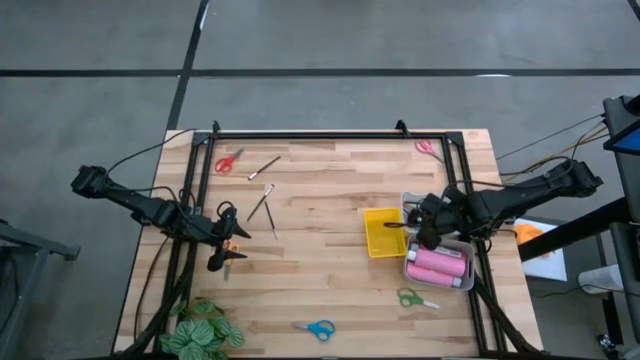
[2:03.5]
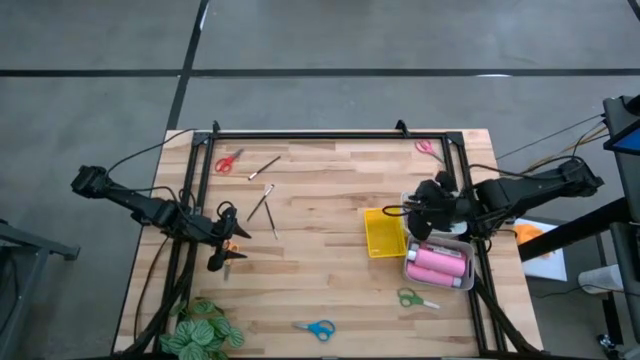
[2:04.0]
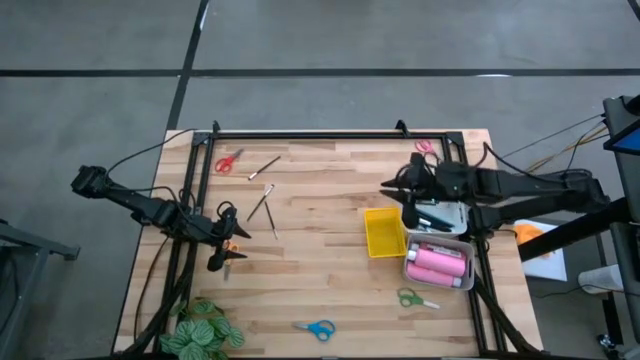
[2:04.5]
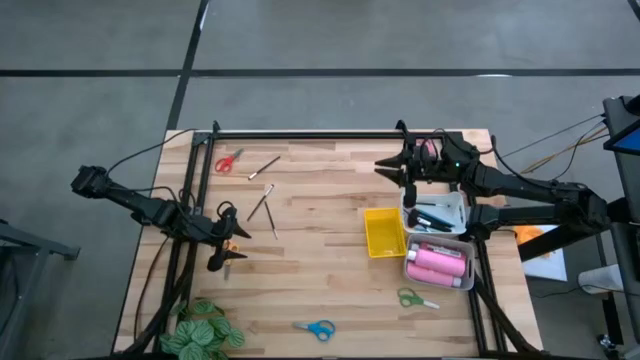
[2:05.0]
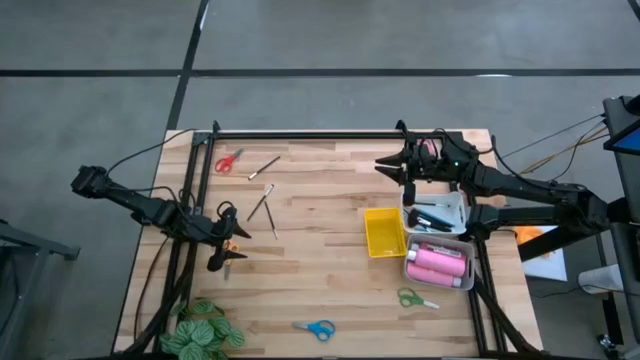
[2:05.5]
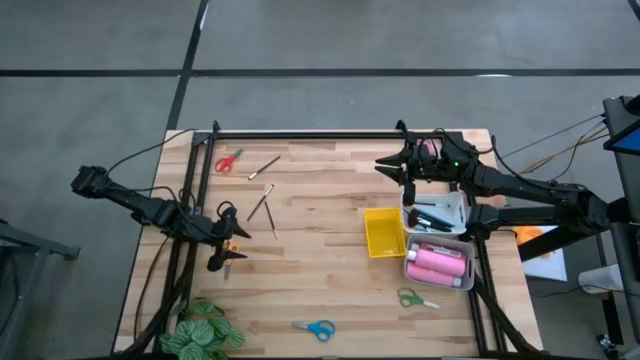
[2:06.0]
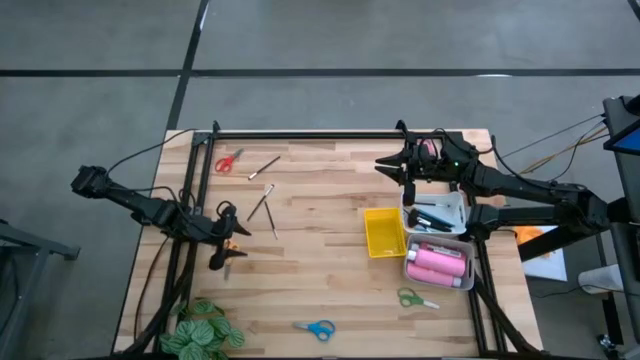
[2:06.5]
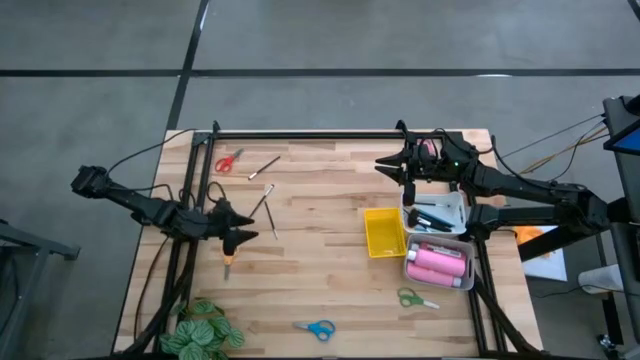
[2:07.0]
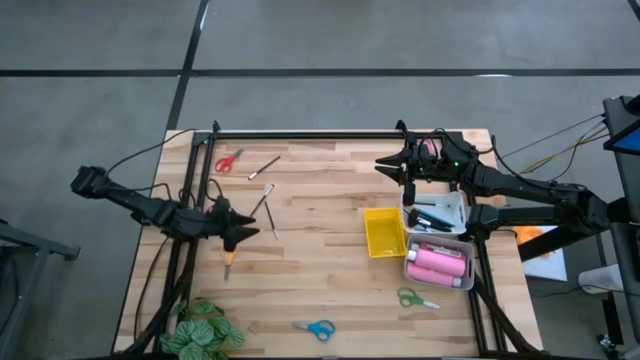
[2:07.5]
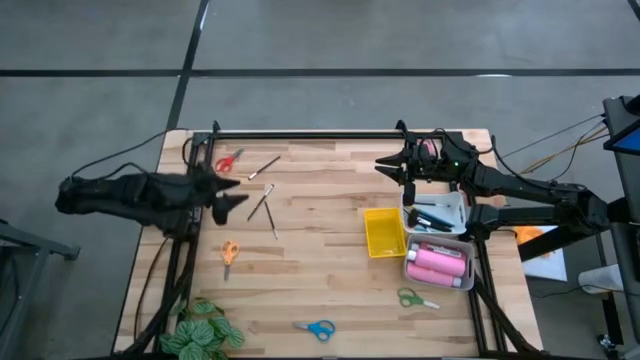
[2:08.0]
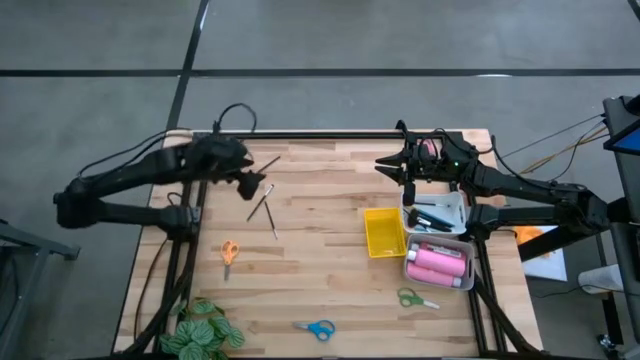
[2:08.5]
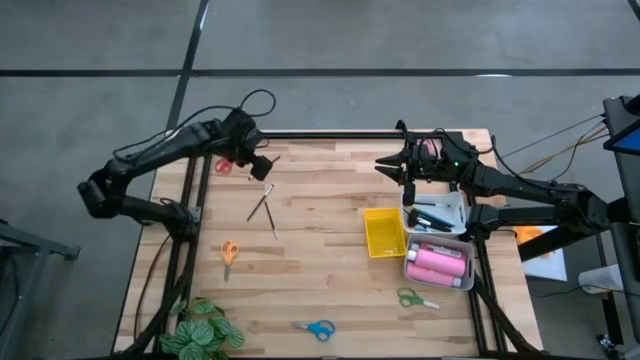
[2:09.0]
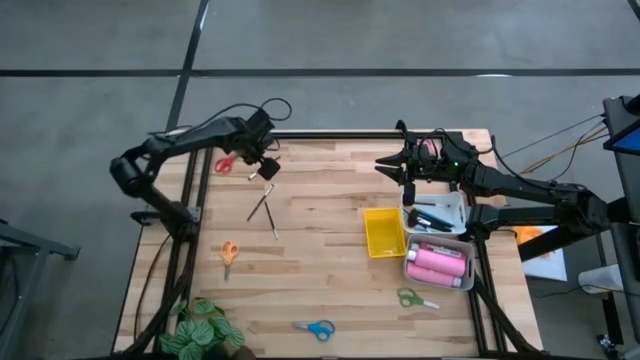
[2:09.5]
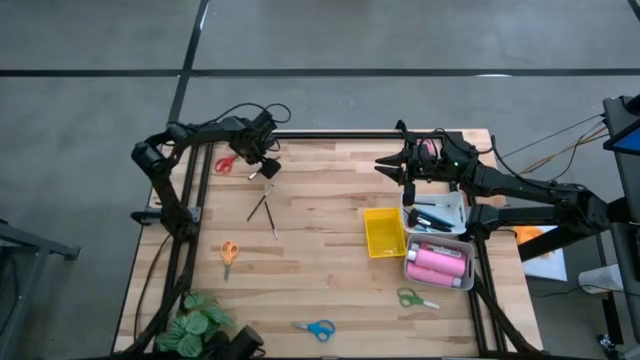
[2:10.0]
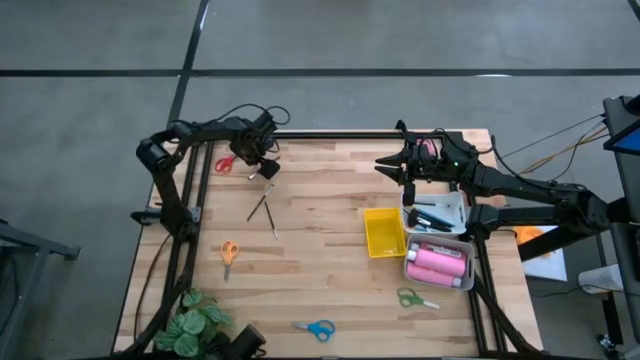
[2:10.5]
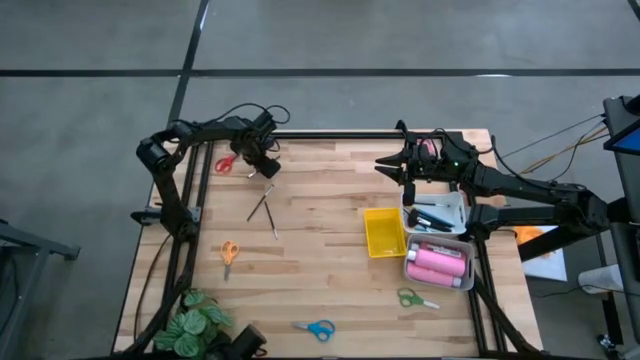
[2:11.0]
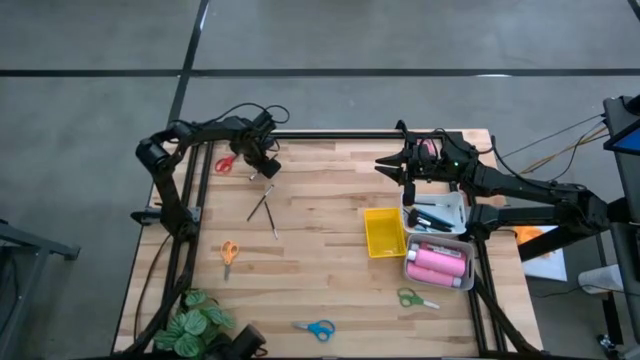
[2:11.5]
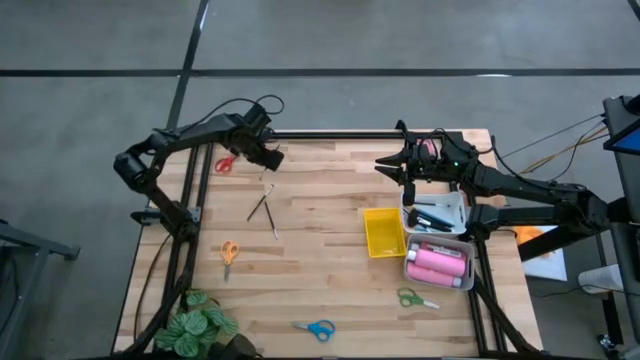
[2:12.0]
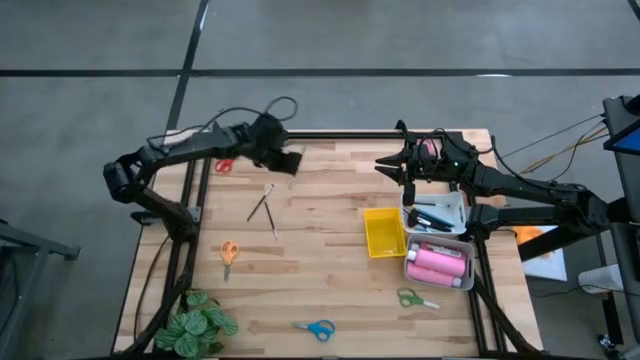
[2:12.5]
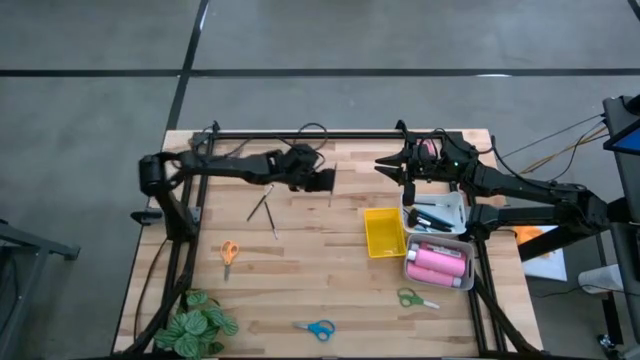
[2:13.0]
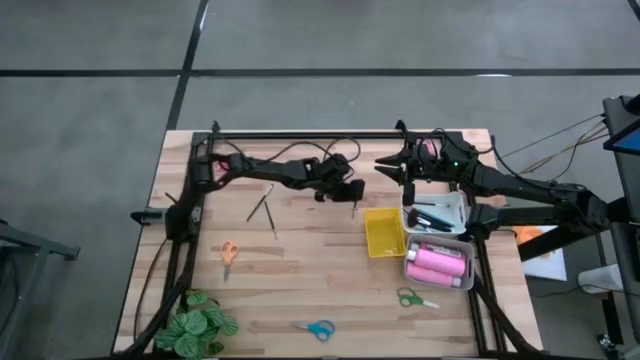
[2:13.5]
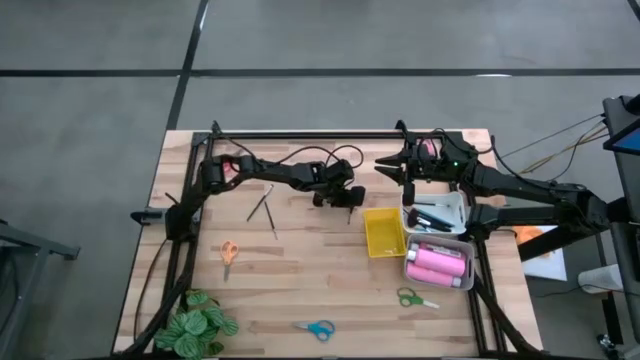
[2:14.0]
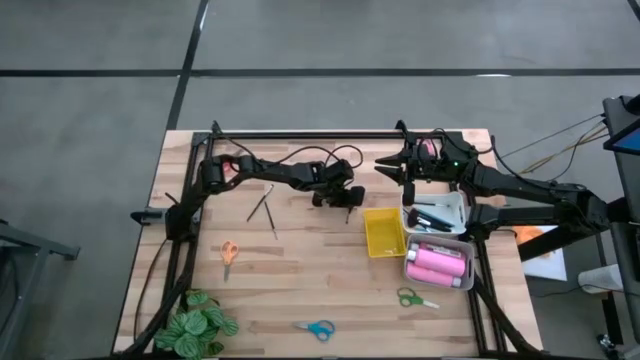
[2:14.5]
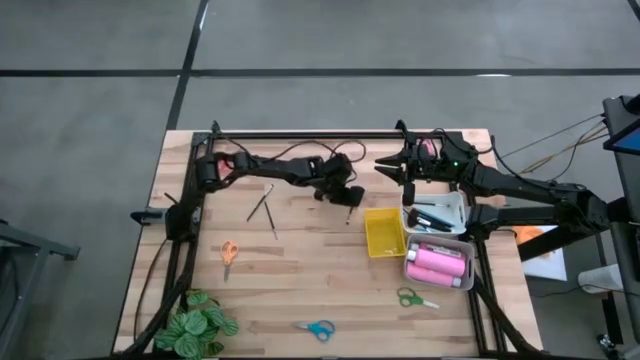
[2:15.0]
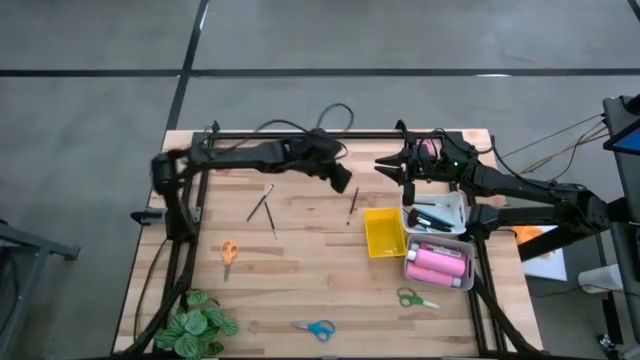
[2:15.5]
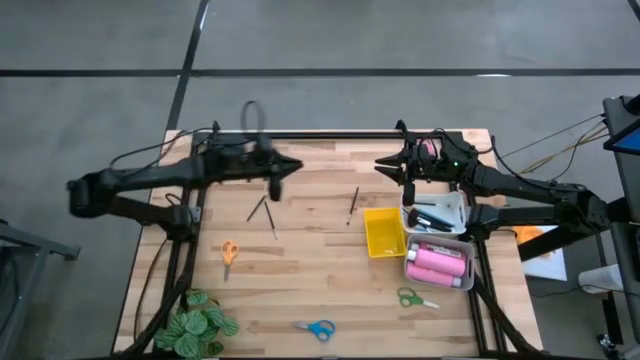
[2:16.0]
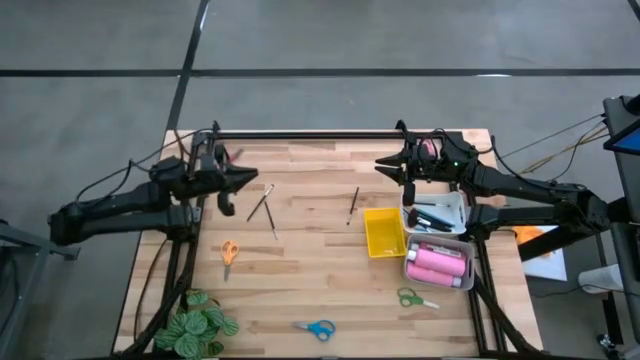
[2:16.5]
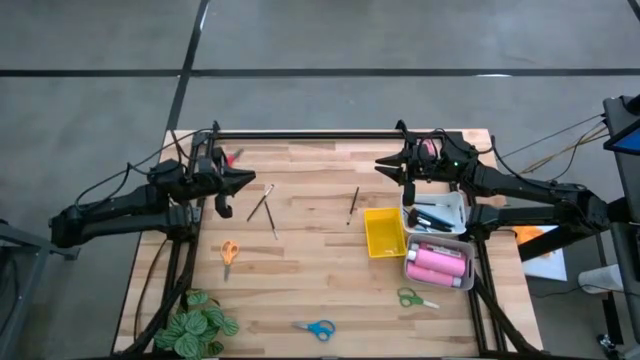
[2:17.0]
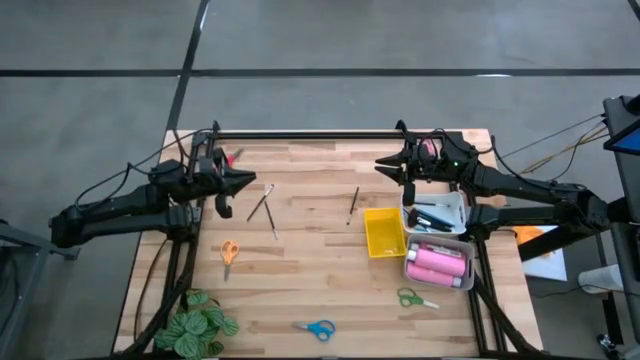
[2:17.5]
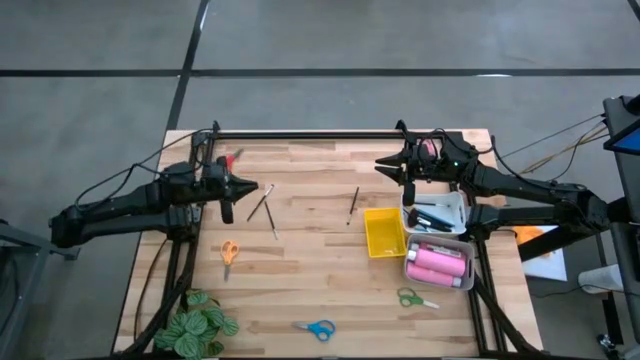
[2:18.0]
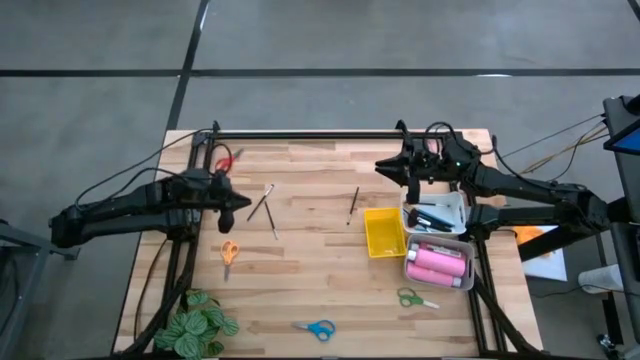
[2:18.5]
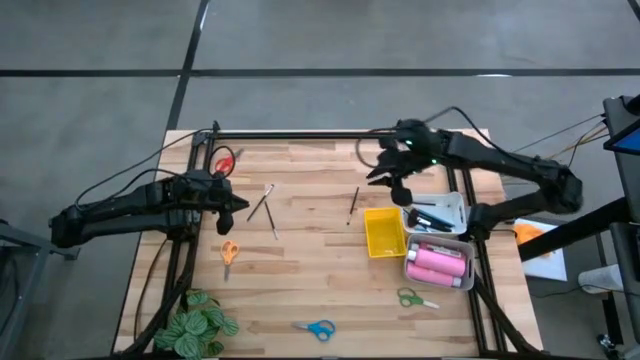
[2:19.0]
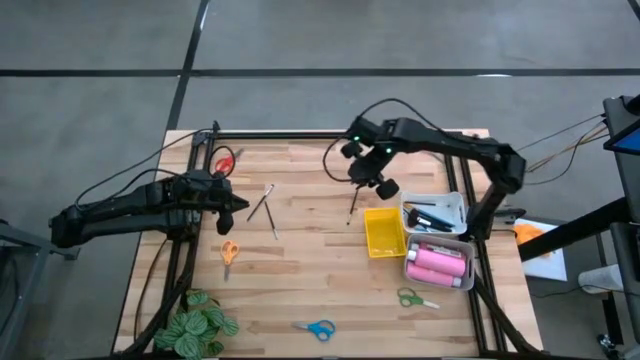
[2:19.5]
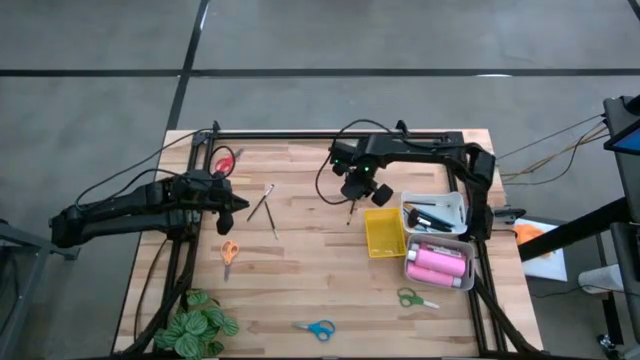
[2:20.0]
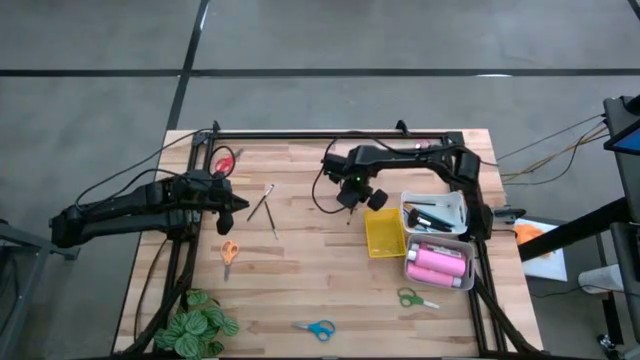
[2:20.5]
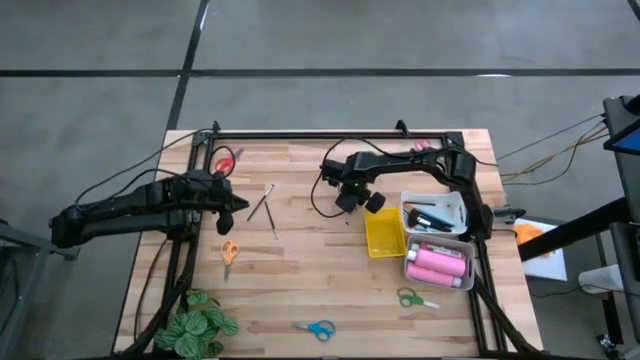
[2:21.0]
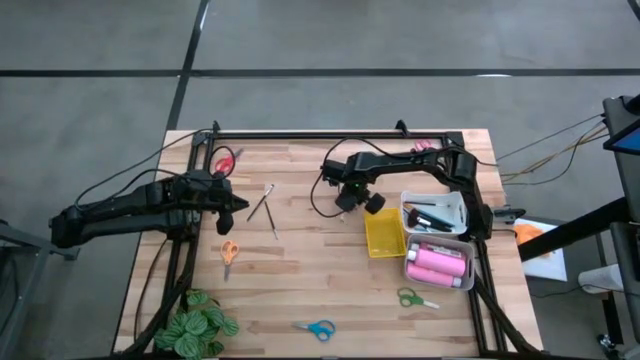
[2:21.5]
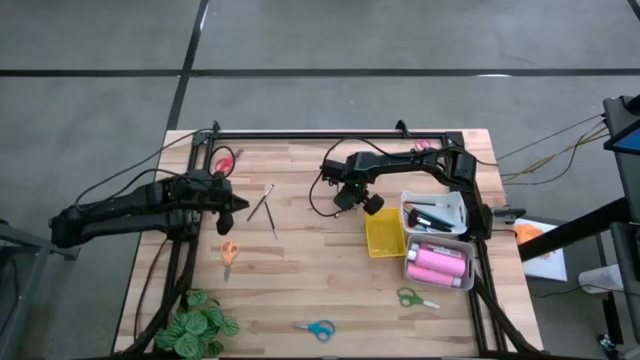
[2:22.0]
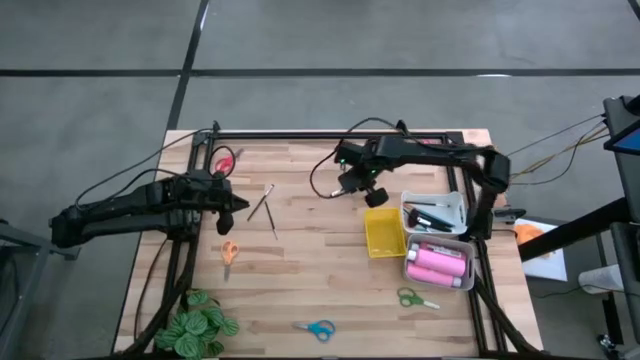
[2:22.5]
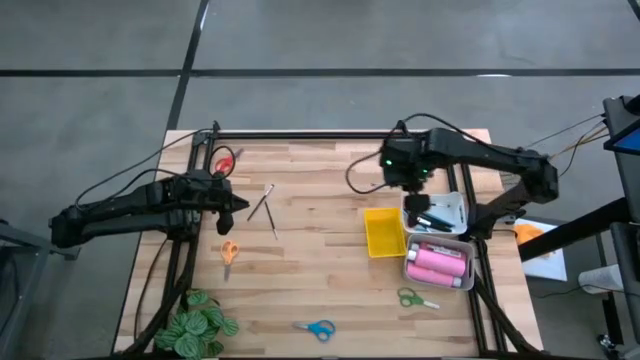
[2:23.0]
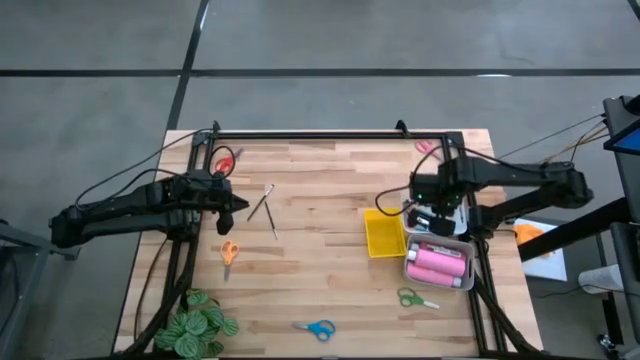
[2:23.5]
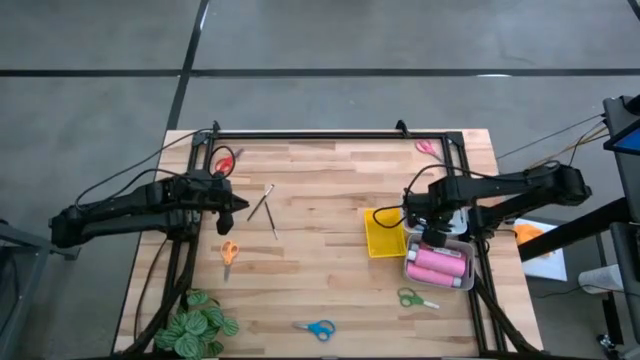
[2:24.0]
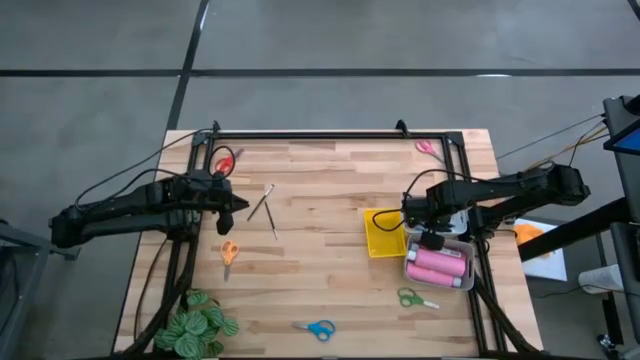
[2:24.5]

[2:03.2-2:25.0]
Task: Pick & Place Paint Supplies
Put the black paint brush into the white bin

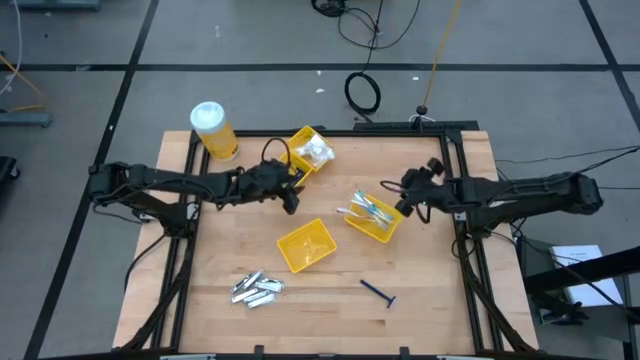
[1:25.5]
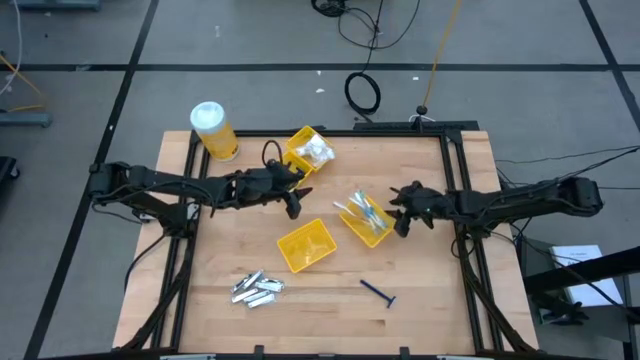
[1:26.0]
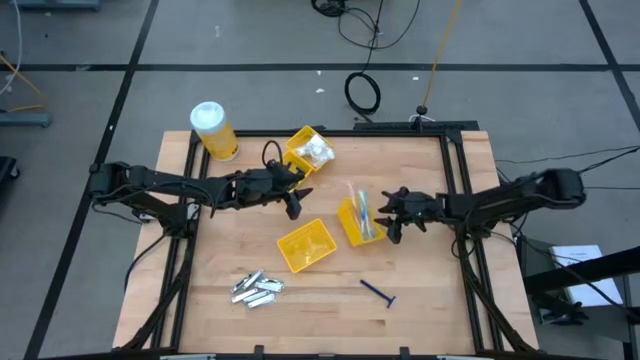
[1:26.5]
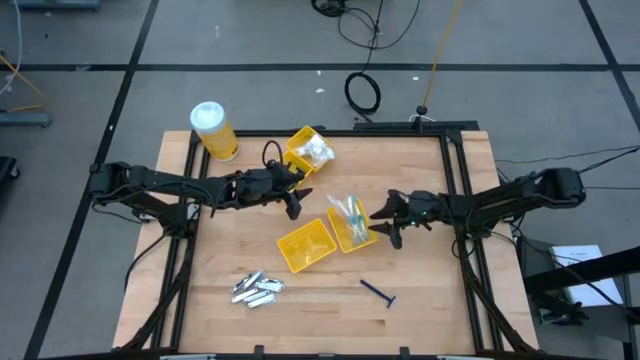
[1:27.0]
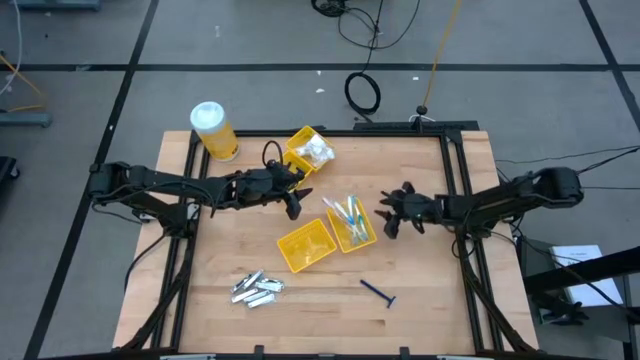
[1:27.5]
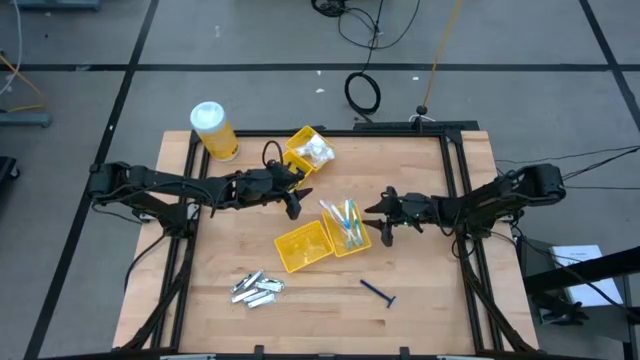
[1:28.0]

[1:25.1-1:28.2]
Task: Pick & Place Travel size toiletries
Adjust the bottom right yellow basket
